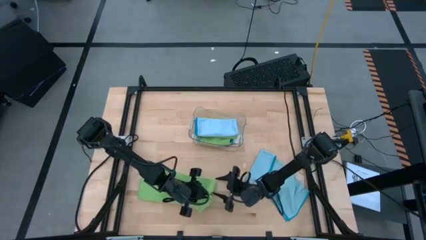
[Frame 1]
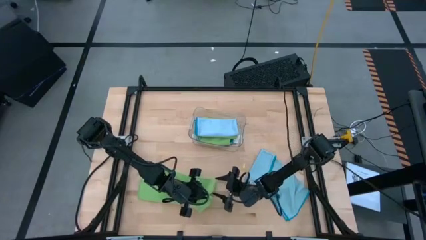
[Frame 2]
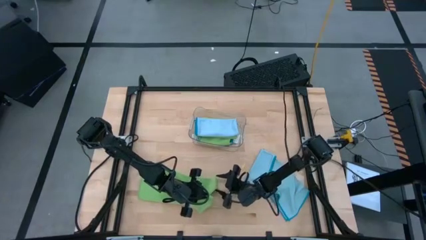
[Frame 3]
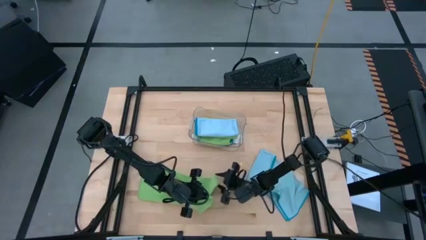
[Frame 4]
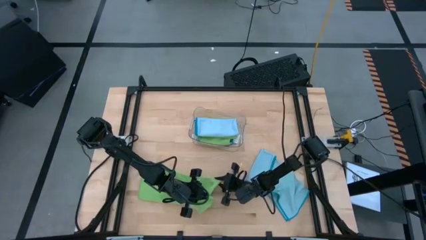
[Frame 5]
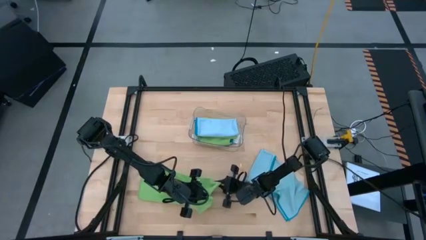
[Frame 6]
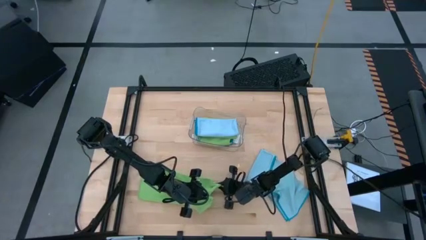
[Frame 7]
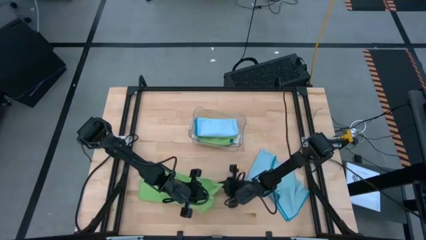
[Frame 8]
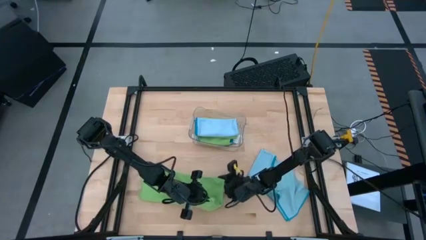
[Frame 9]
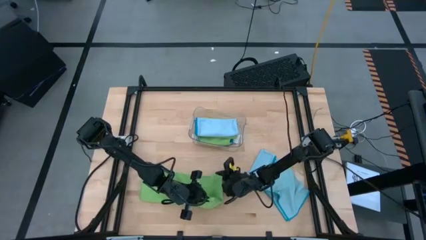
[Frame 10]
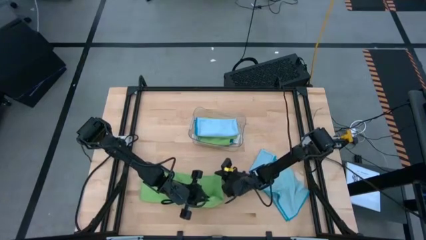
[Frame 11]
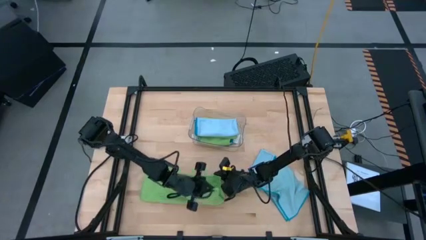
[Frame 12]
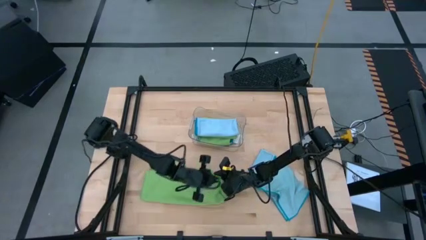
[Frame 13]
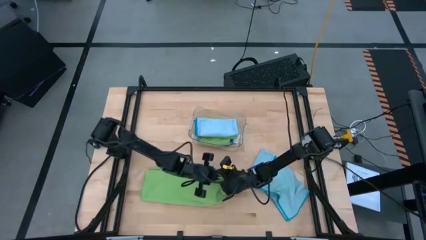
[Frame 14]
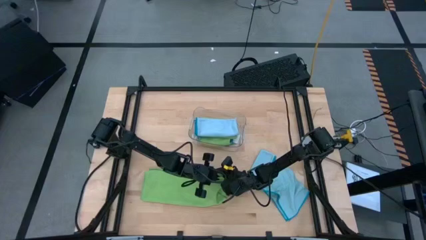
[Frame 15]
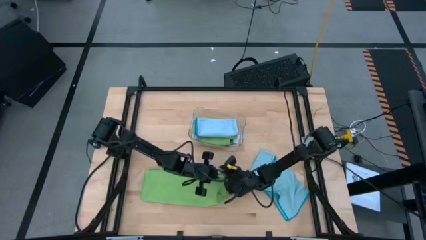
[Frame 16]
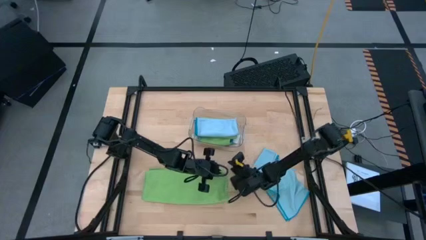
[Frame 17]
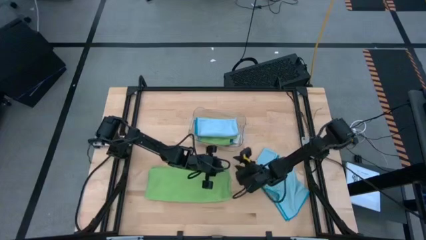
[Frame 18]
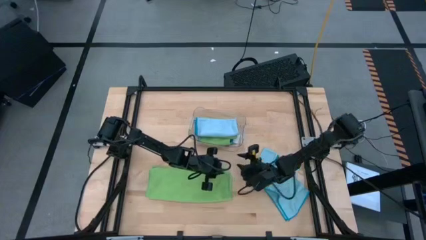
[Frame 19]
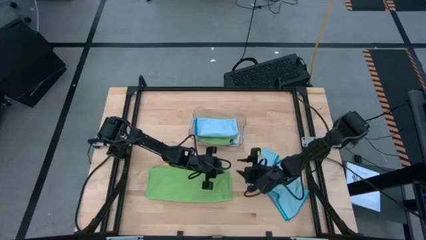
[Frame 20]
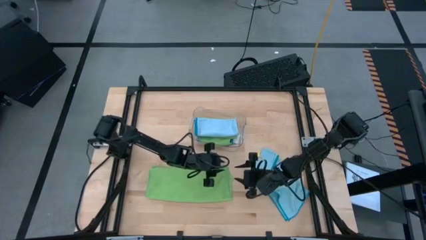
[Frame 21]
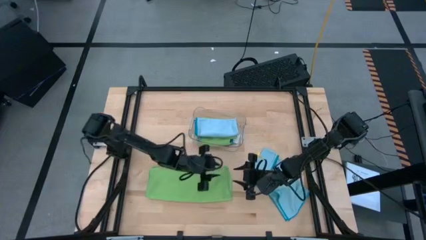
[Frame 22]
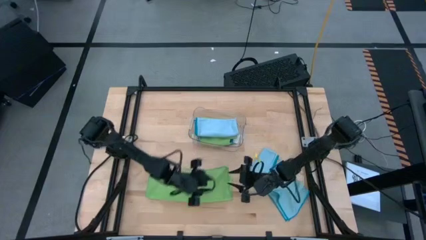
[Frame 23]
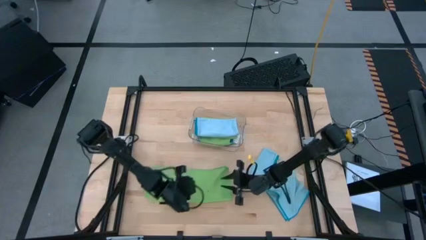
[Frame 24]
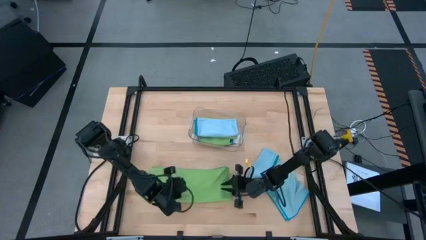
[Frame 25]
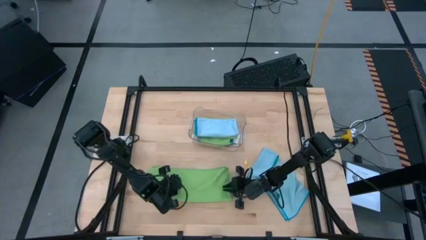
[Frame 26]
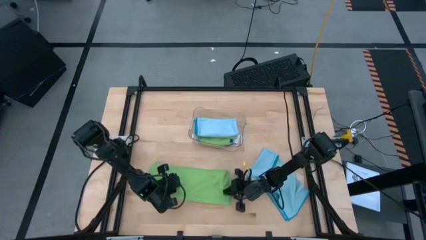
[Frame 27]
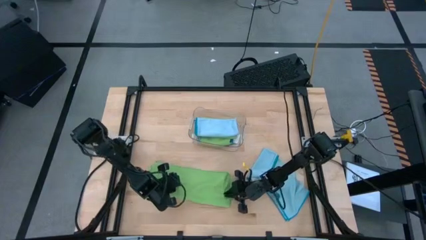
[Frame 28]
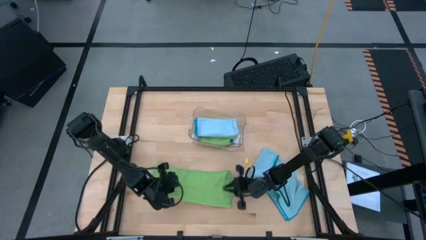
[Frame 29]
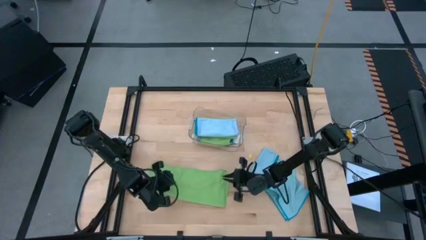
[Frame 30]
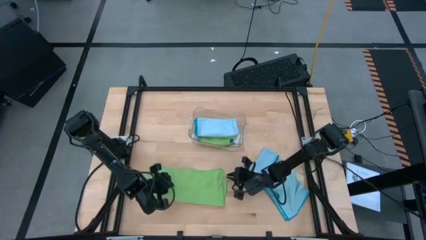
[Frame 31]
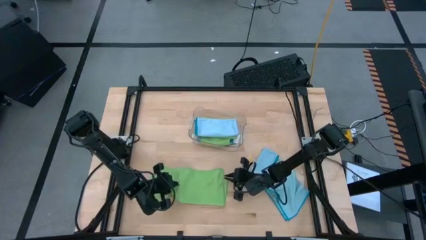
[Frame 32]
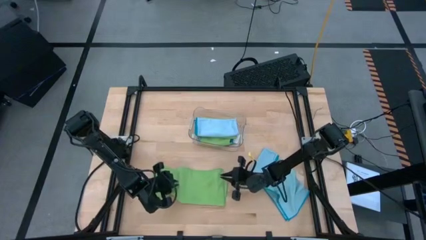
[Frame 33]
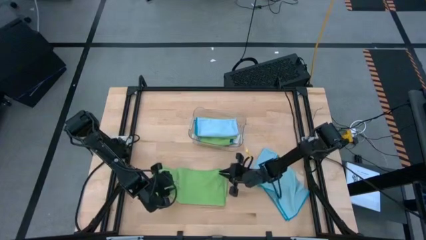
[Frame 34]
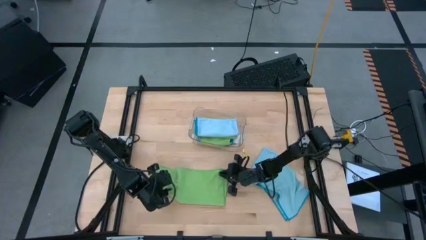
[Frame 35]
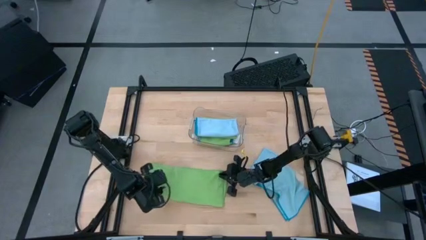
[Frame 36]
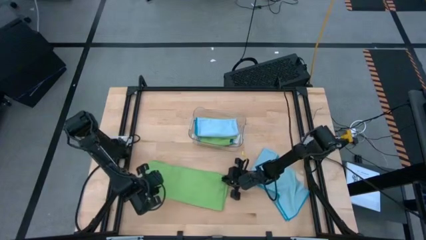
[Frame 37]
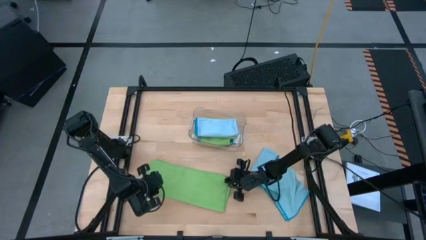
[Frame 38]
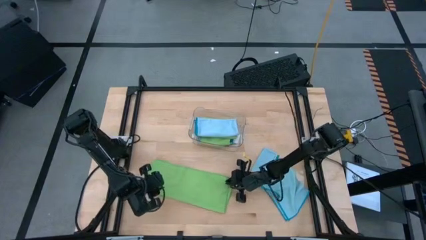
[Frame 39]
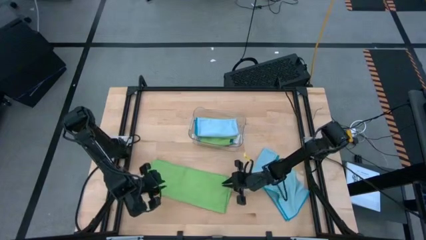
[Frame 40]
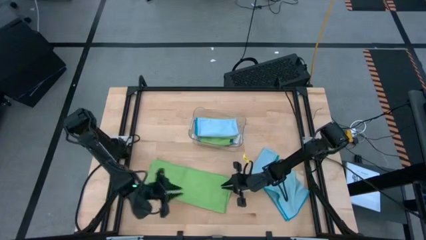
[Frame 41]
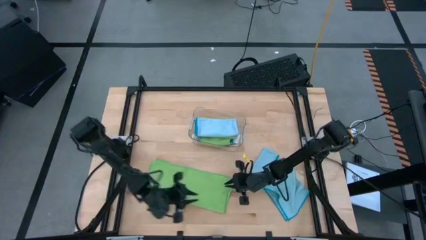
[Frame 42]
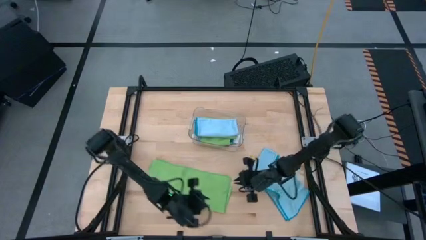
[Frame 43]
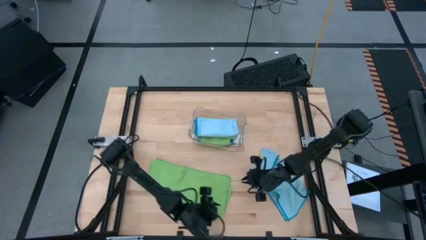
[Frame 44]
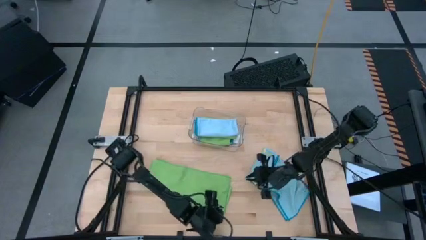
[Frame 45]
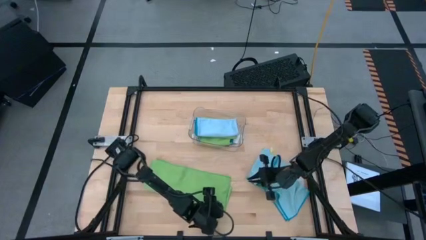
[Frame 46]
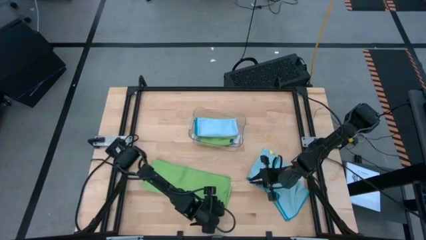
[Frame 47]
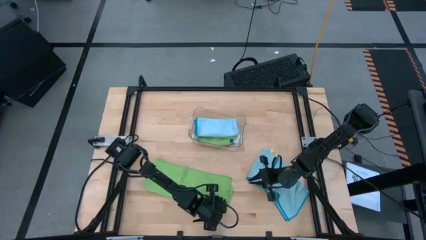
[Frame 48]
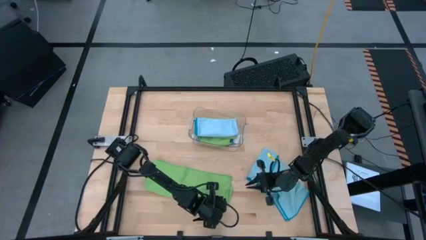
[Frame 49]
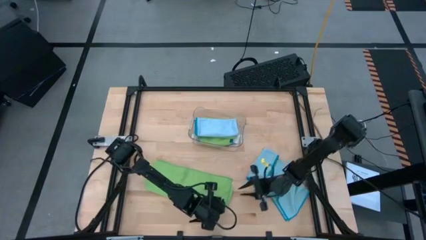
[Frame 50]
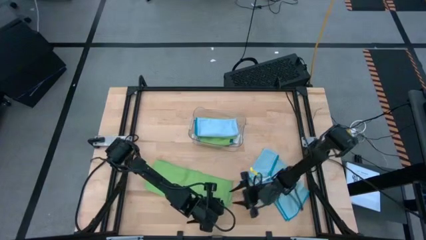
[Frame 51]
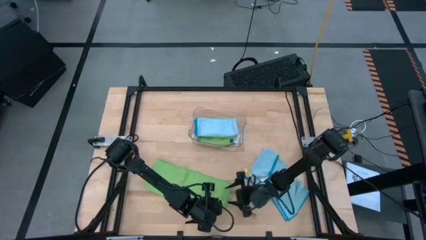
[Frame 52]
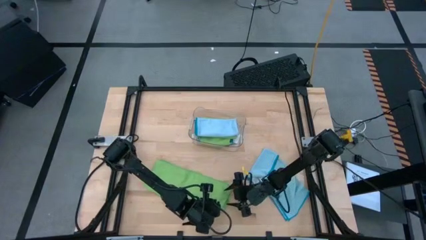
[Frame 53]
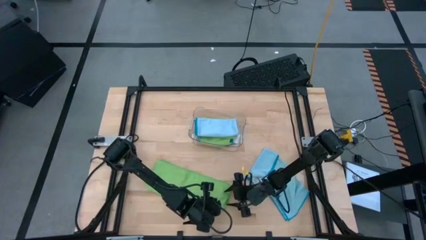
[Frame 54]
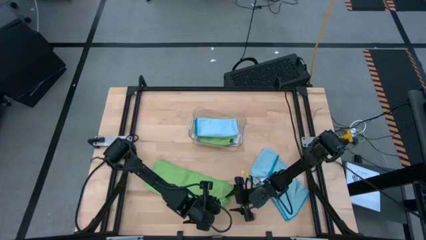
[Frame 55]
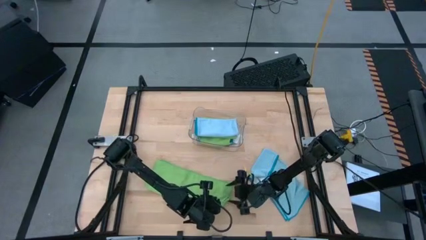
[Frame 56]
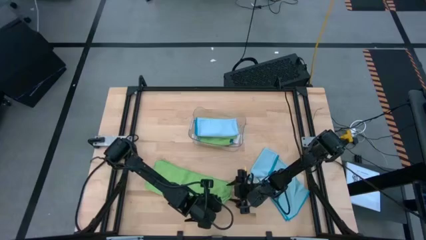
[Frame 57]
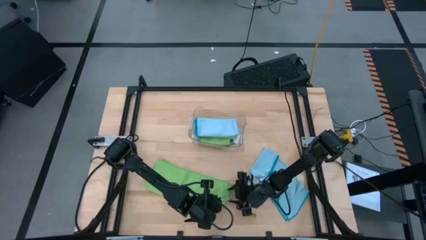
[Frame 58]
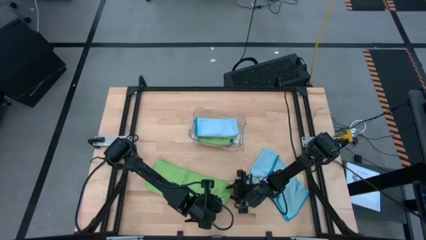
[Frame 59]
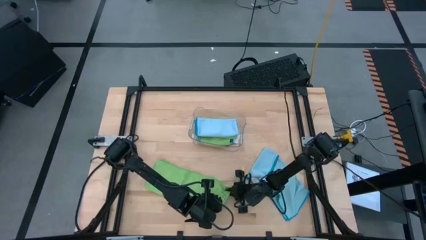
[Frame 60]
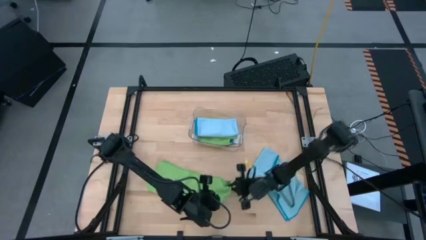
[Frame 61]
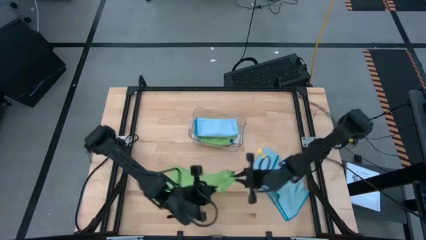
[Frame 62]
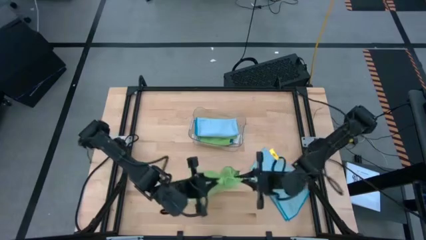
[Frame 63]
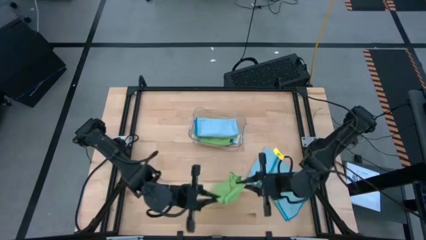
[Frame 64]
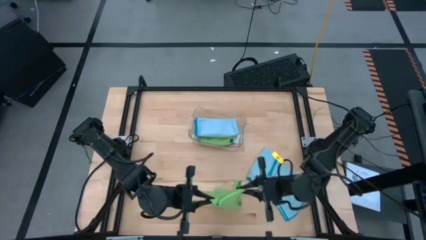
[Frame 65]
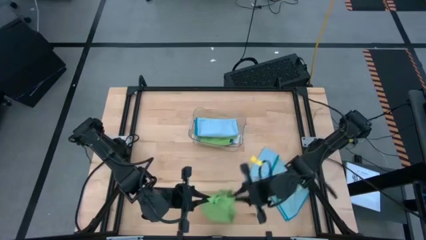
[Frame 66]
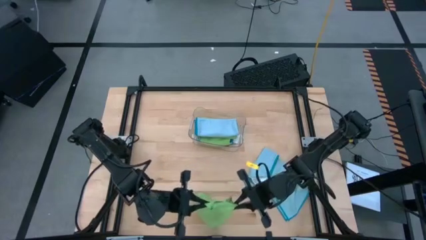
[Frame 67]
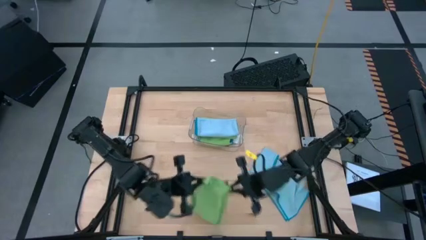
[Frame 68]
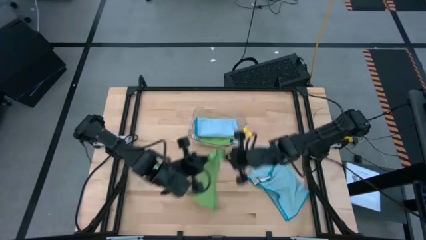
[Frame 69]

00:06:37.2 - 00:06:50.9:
Task: Fold microfiber towels
Fold the green microfiber cloth
